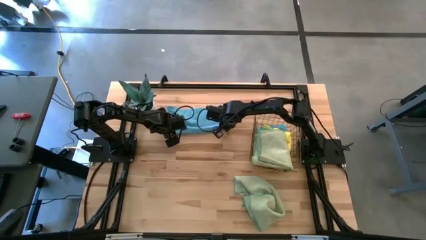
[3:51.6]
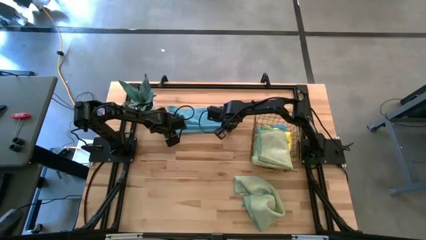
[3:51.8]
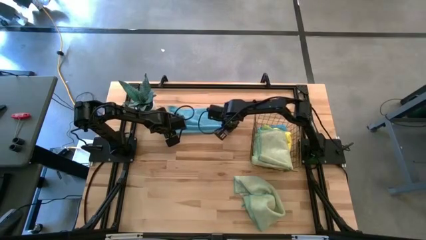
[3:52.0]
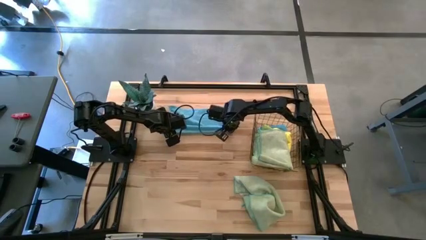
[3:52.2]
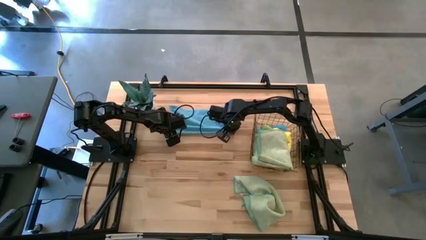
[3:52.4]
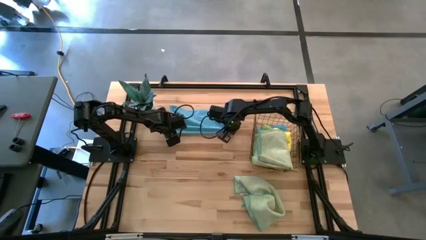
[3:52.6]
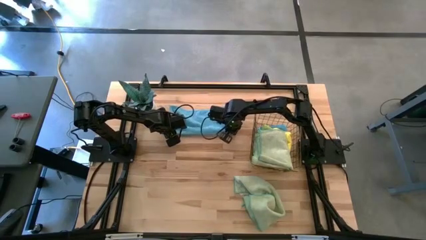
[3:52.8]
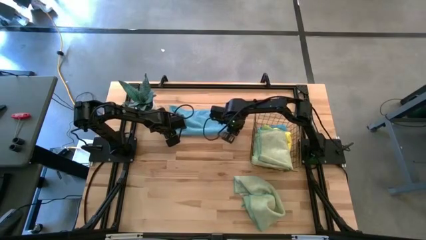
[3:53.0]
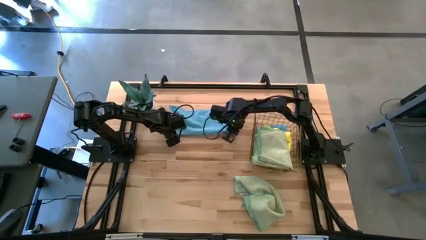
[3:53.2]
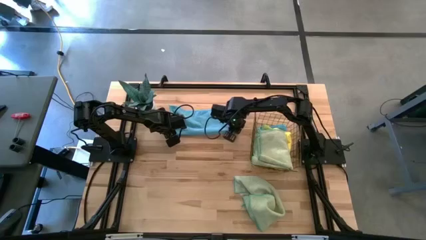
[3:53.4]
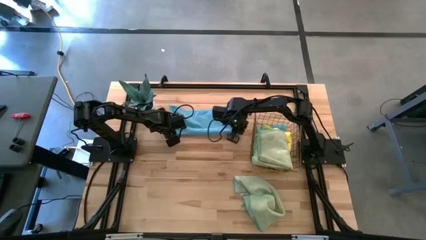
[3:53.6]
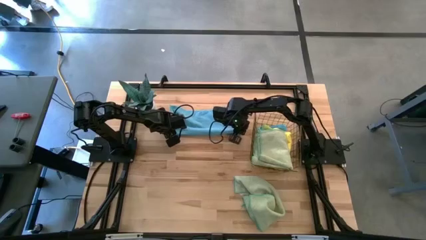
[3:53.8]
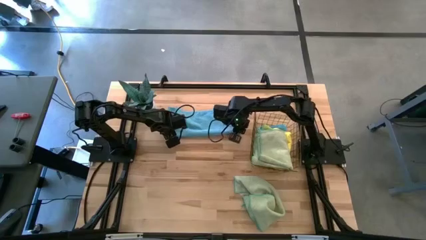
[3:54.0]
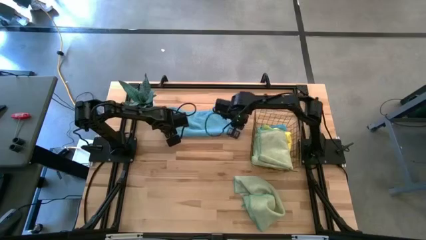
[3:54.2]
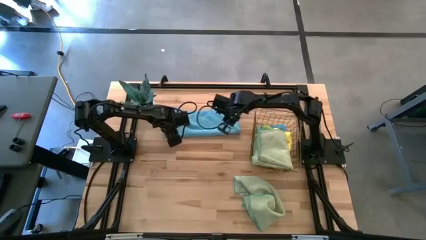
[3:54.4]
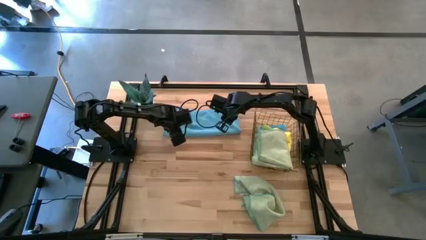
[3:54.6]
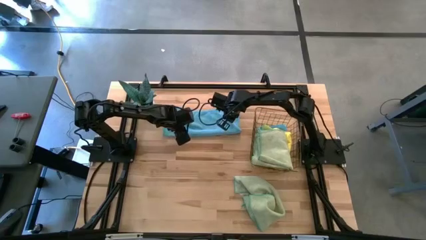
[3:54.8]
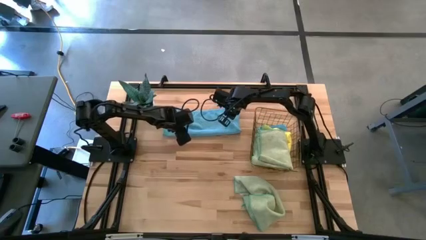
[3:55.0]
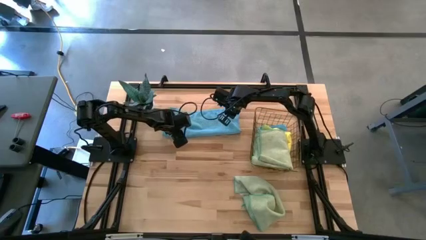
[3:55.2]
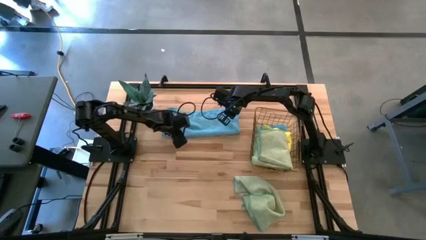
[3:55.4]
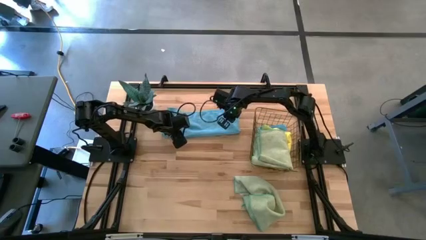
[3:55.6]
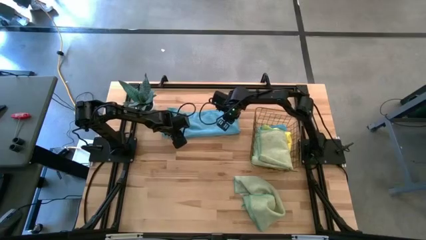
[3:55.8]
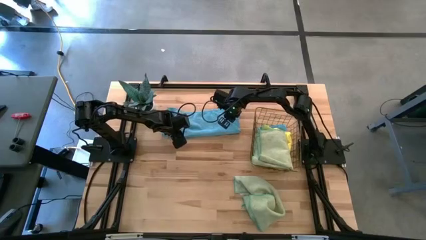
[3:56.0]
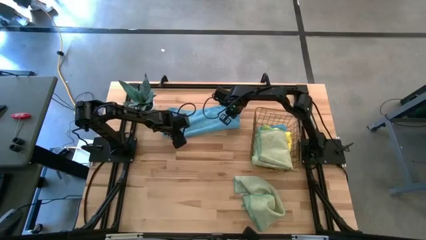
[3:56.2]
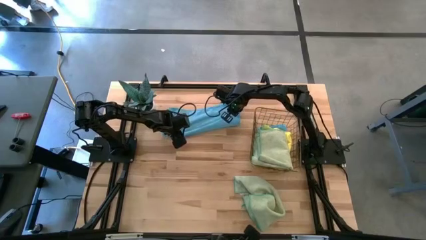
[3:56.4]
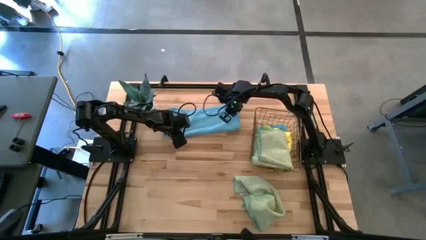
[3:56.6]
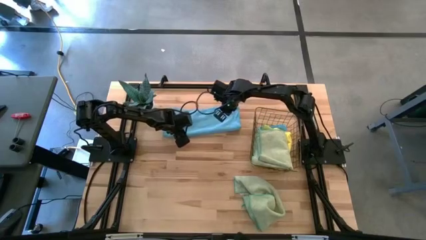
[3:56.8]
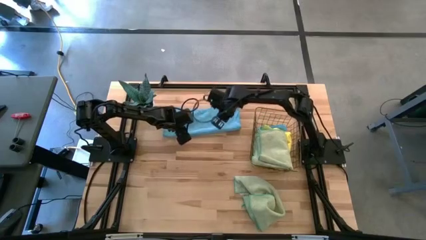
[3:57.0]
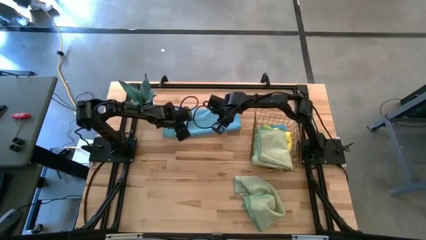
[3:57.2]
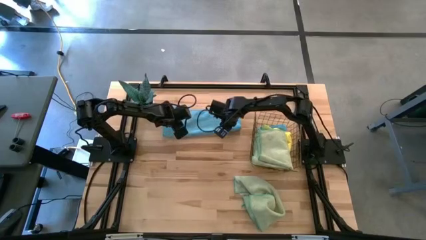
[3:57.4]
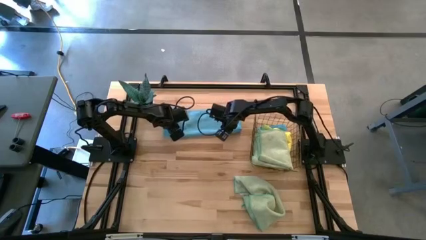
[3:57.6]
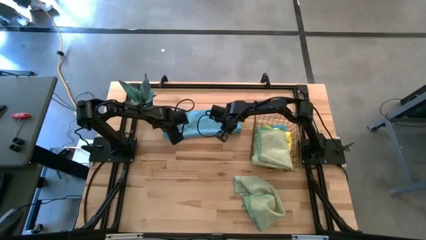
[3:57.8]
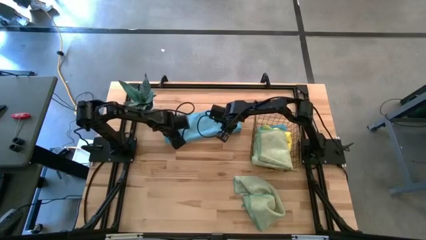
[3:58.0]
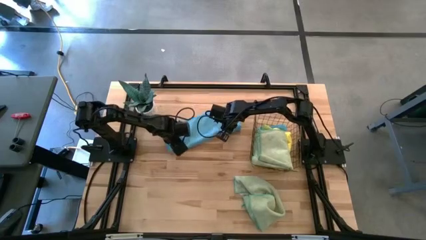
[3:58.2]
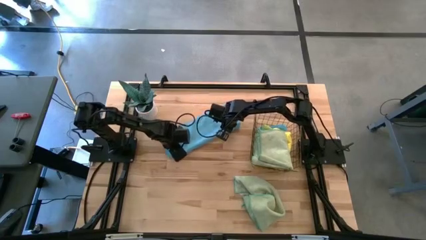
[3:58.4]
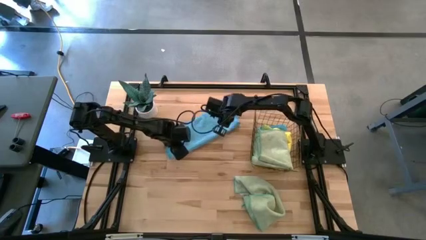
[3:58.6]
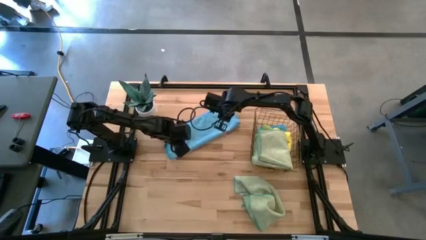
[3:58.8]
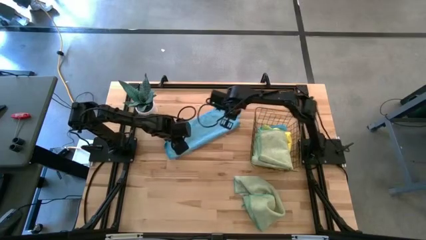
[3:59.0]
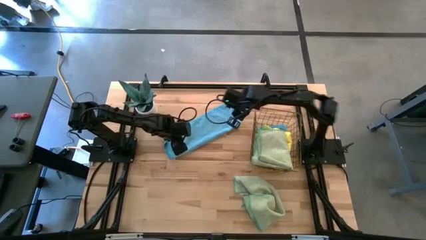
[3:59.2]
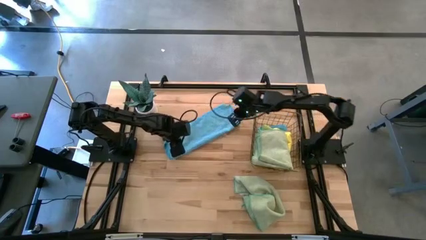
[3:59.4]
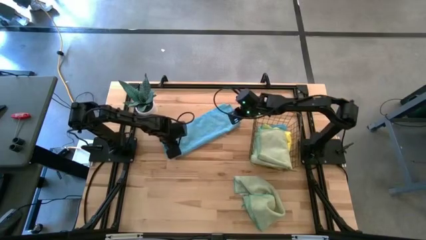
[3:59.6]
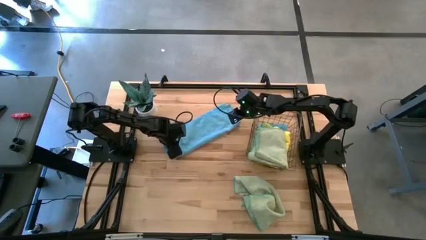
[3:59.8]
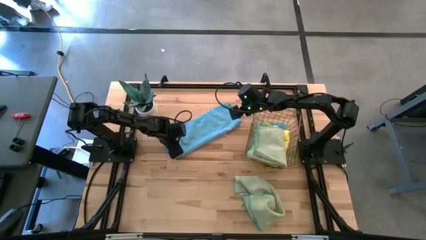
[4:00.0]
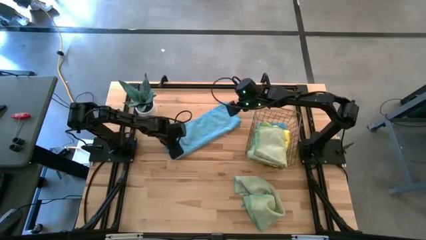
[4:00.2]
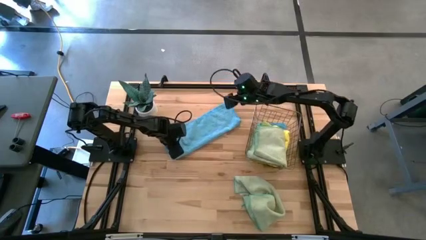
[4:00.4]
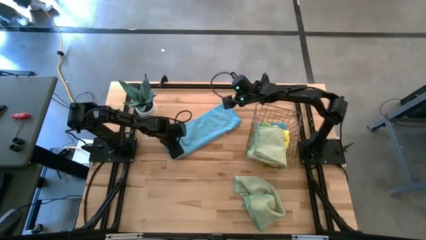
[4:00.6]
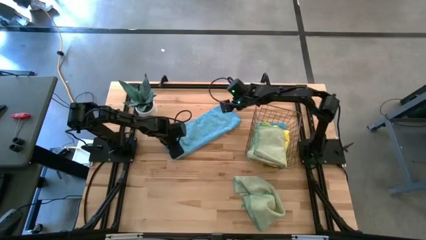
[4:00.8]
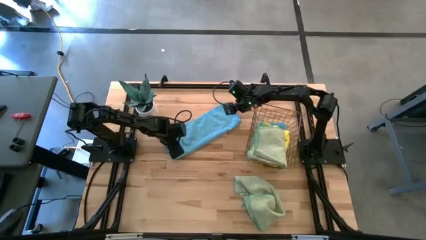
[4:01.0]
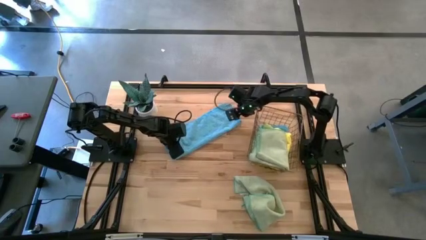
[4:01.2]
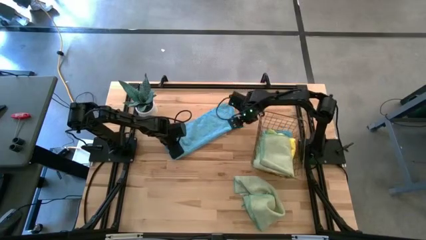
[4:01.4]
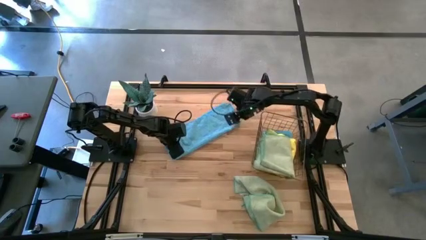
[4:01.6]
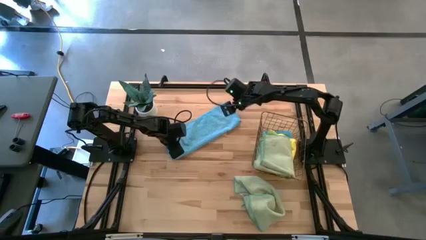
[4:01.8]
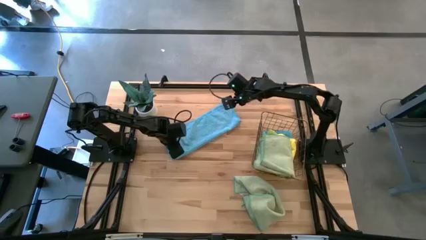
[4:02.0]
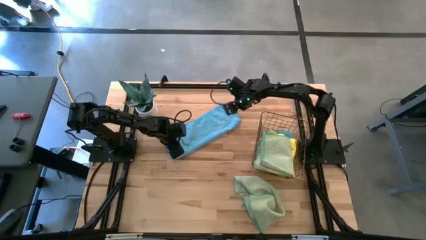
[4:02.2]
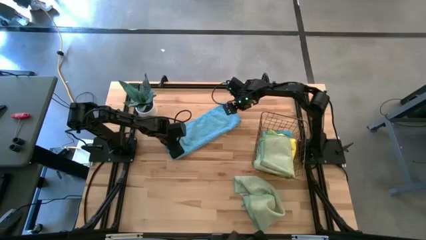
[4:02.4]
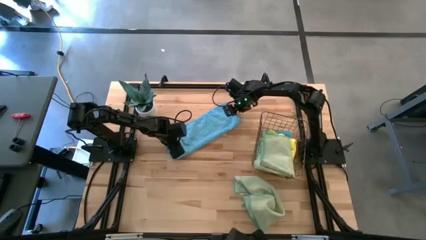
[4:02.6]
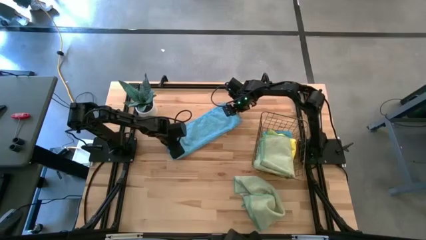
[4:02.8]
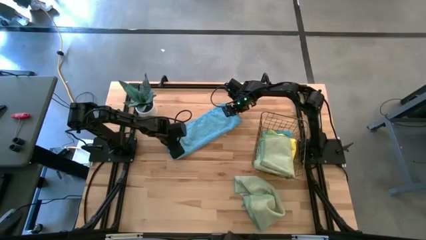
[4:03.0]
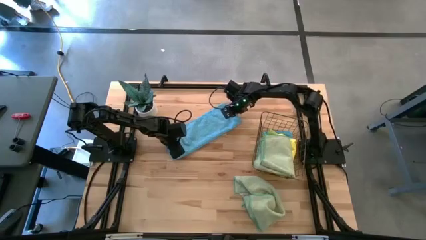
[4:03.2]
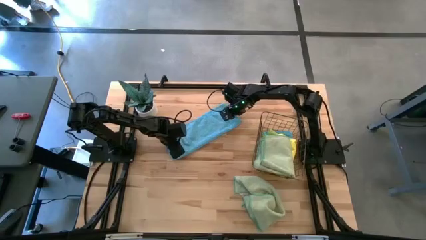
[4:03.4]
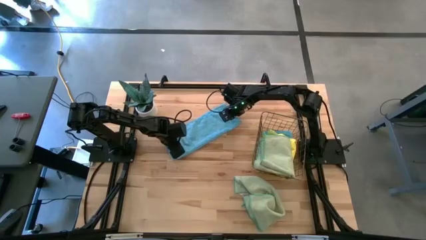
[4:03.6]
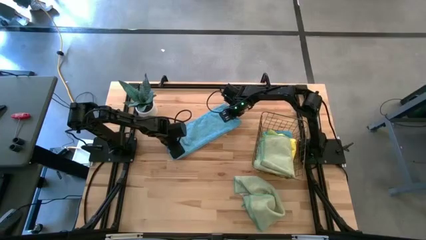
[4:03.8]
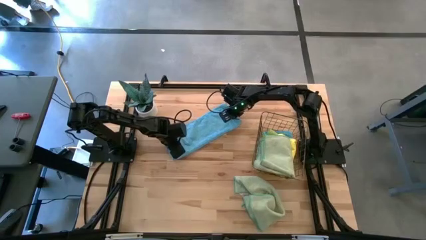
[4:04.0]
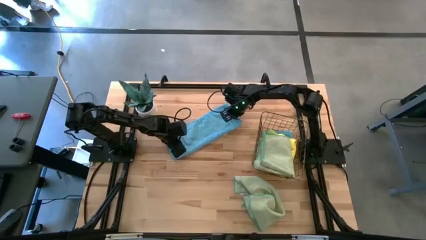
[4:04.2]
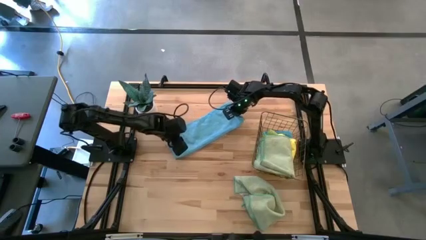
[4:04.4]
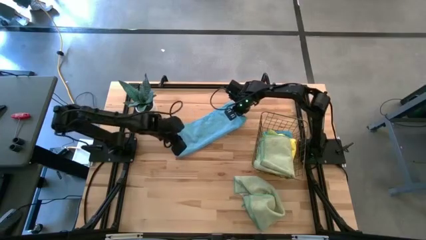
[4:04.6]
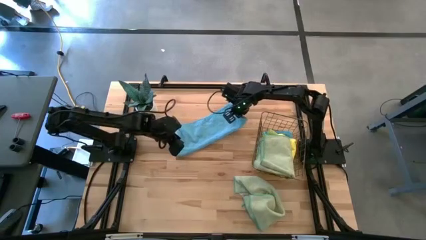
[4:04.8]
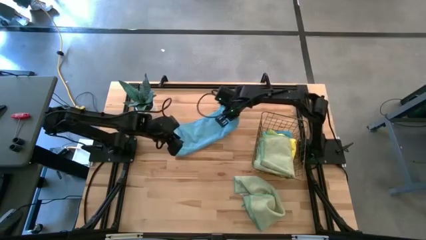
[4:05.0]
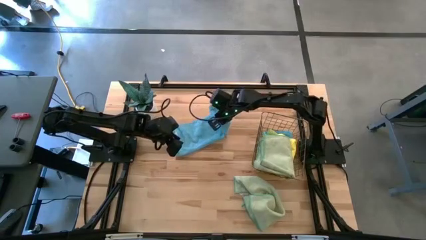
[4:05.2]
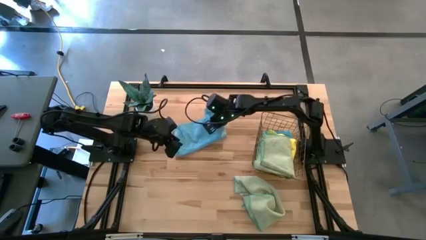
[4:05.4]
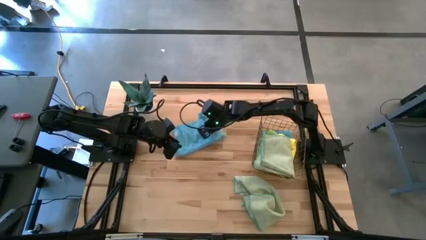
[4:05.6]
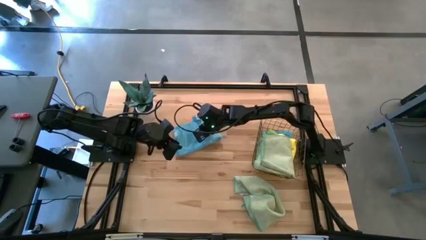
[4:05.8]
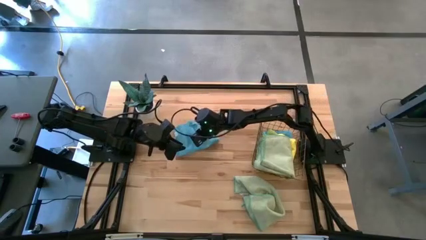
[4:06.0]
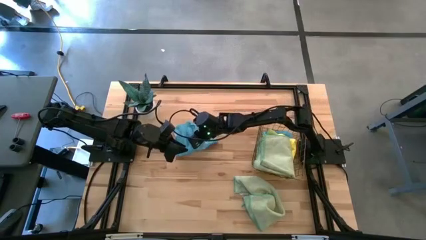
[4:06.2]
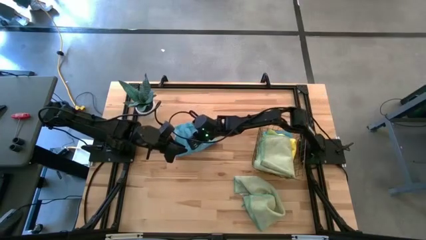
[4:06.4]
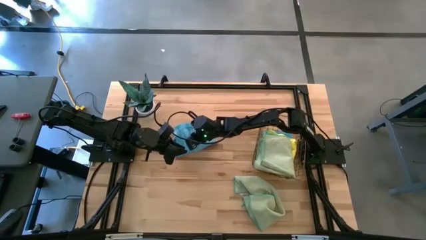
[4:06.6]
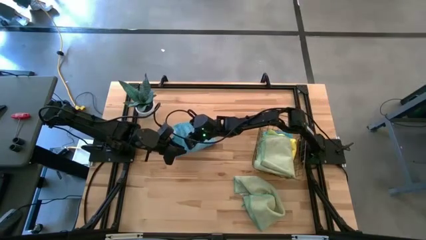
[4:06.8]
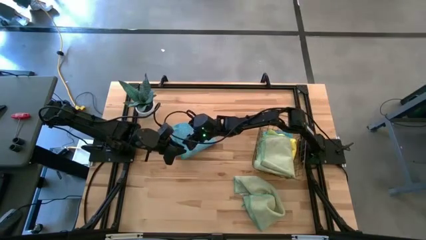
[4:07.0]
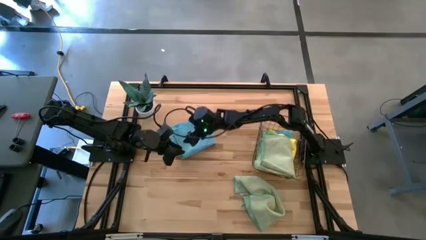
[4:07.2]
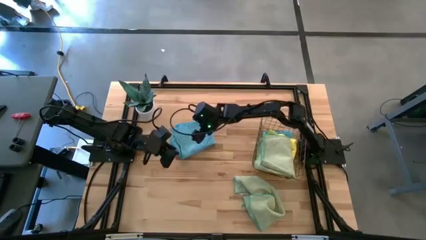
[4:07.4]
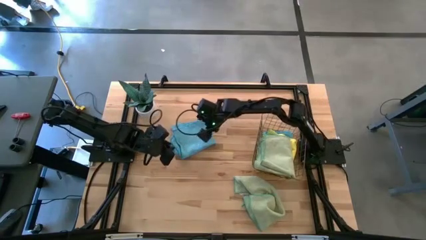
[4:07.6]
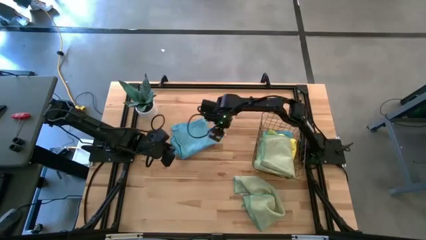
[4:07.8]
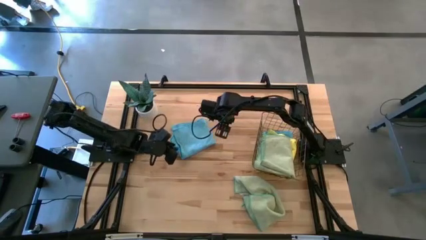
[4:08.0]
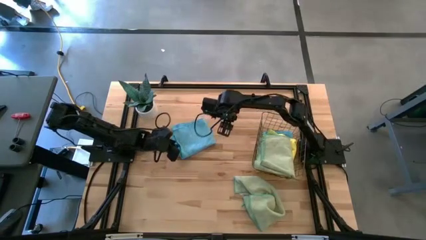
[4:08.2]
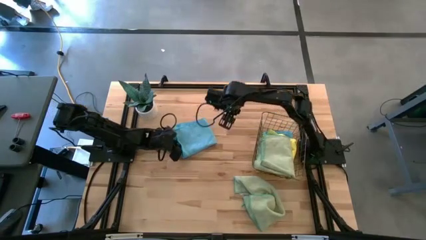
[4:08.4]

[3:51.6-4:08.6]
Task: Fold microfiber towels
Fold the blue microfiber cloth
